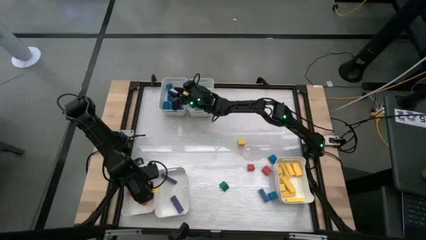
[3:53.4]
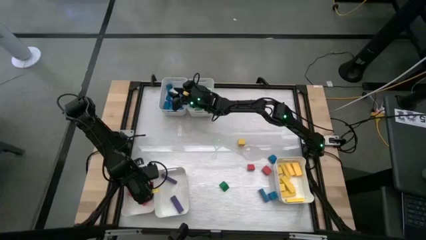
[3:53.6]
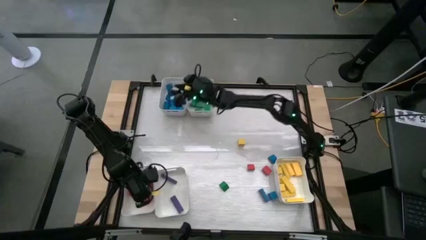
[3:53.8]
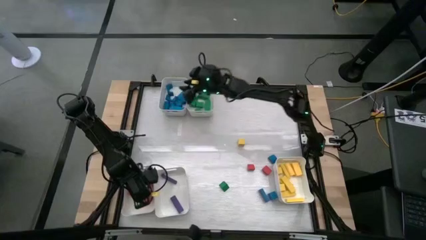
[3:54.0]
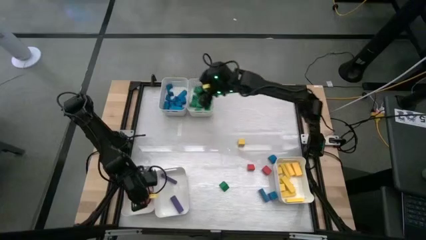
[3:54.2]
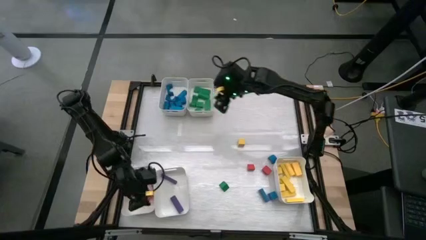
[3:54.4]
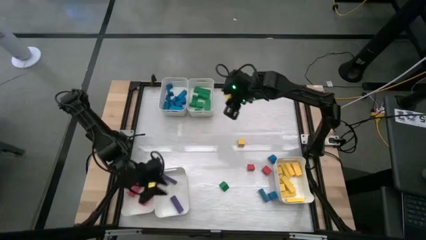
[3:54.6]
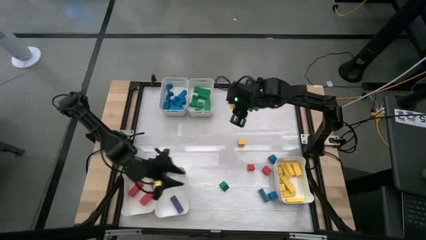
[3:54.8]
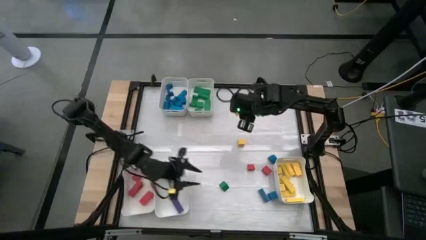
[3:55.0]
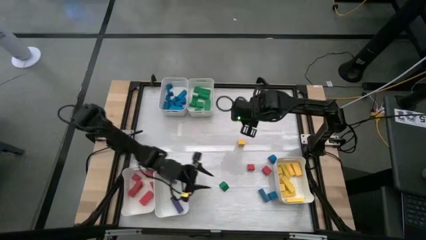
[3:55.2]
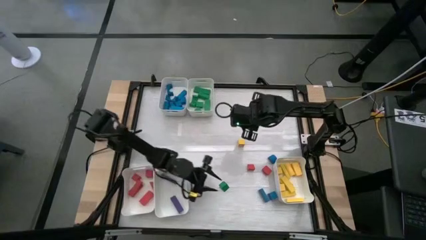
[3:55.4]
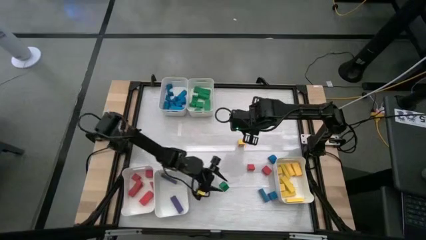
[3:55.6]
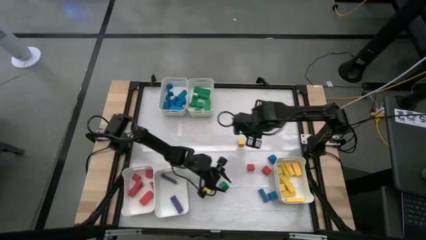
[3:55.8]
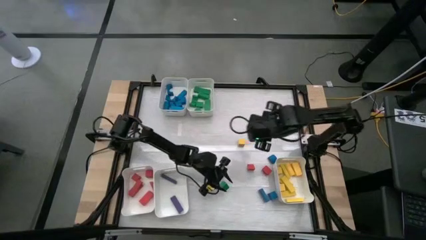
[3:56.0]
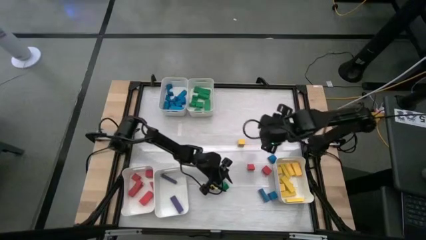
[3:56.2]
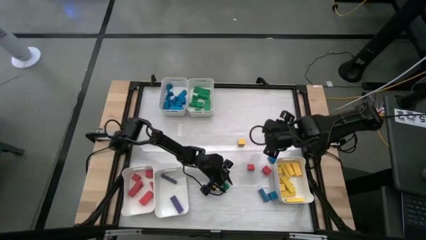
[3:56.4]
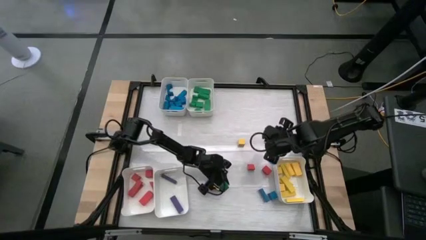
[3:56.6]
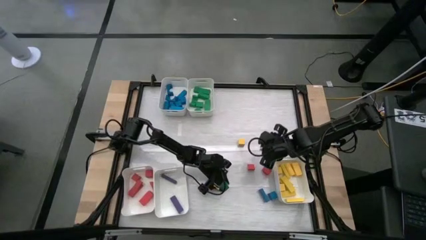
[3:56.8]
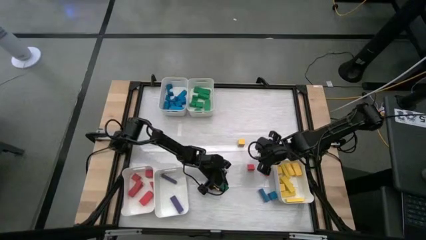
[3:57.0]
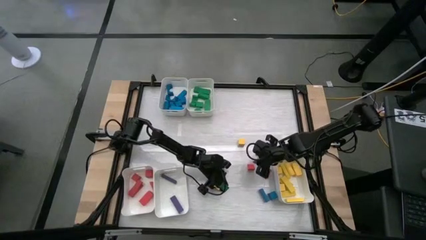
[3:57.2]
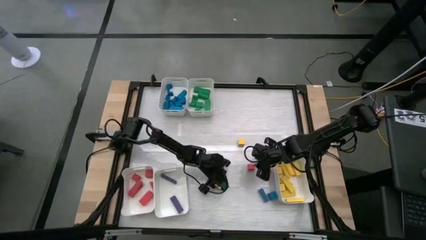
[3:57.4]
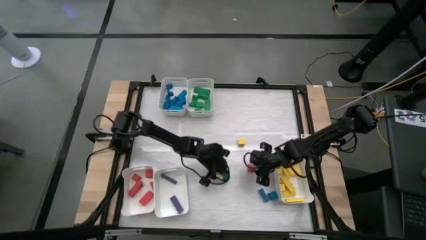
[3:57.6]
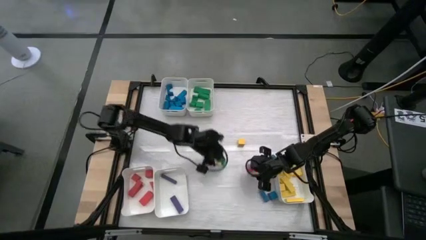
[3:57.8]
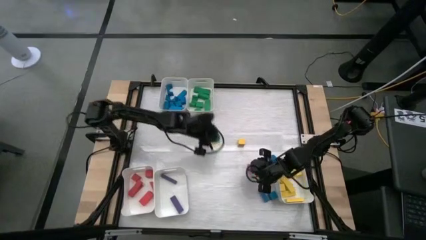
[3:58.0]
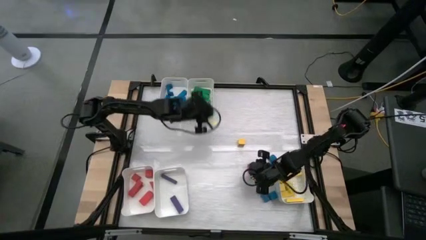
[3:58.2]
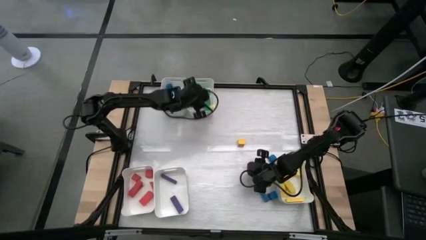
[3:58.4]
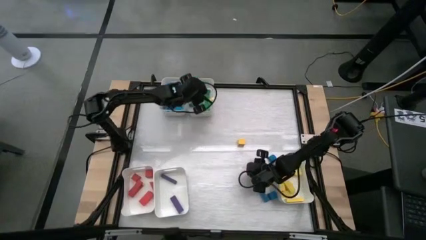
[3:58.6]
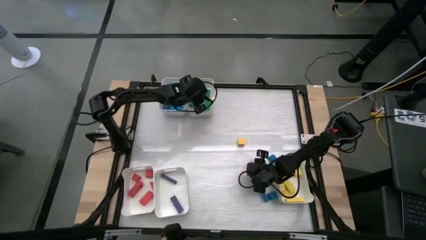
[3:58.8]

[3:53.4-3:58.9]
Task: Sort blocks
Put the green block into the top right white bin

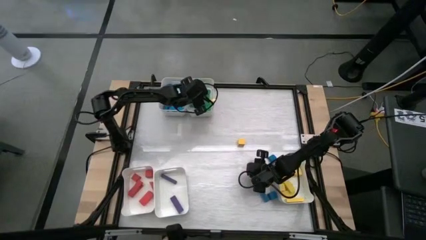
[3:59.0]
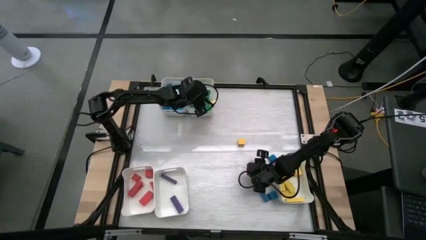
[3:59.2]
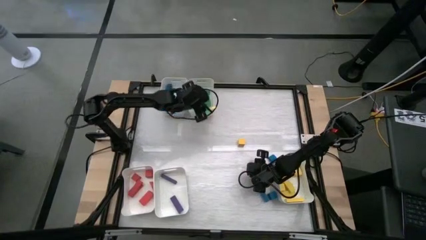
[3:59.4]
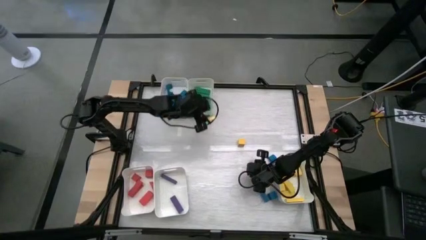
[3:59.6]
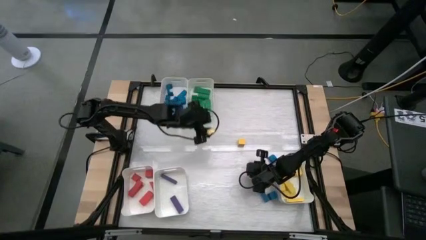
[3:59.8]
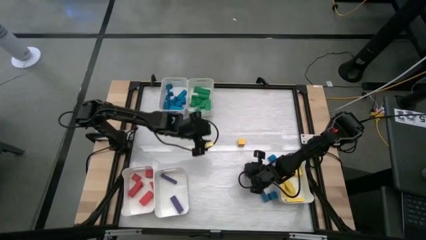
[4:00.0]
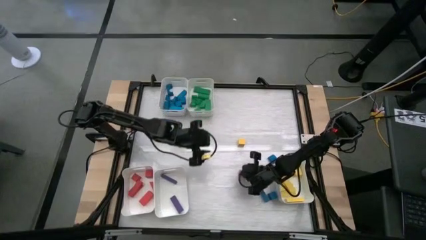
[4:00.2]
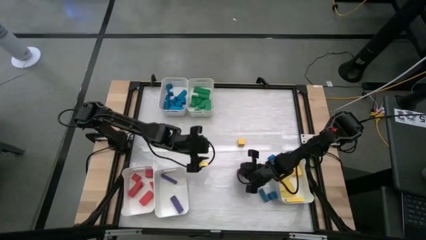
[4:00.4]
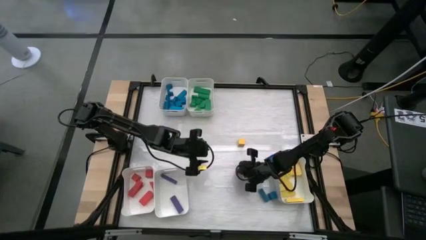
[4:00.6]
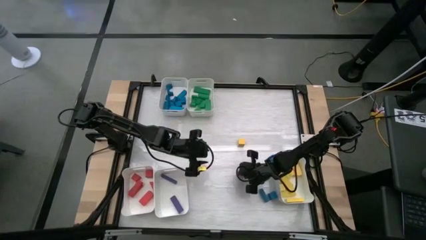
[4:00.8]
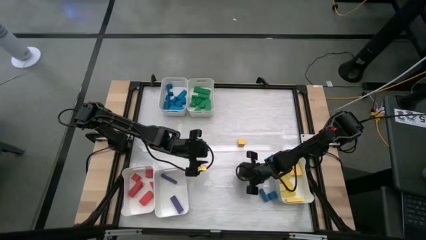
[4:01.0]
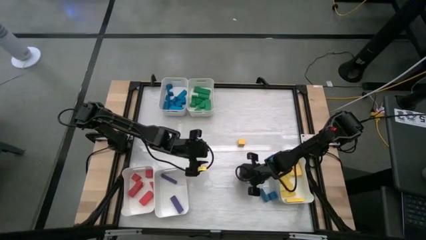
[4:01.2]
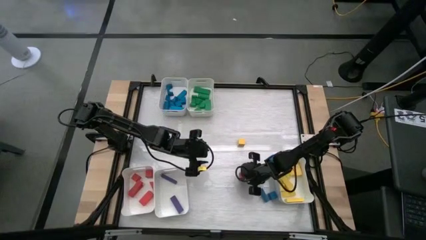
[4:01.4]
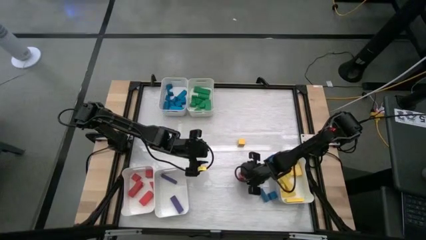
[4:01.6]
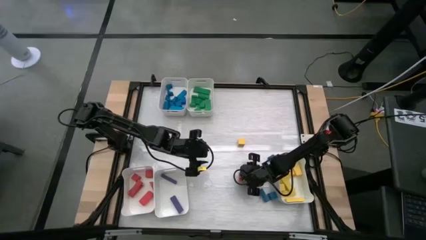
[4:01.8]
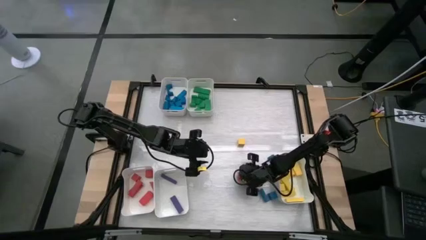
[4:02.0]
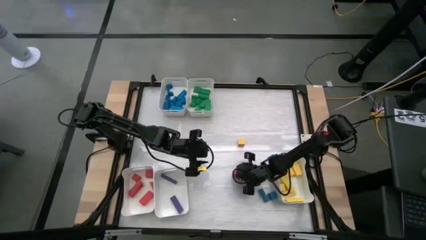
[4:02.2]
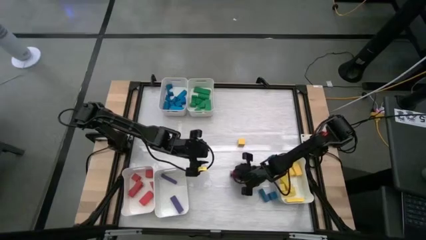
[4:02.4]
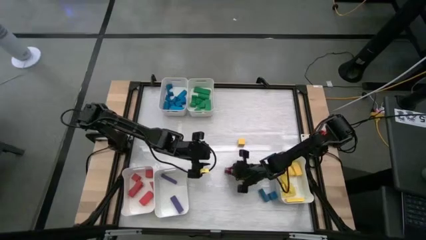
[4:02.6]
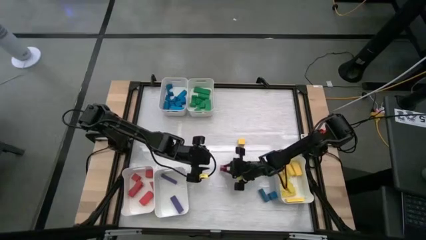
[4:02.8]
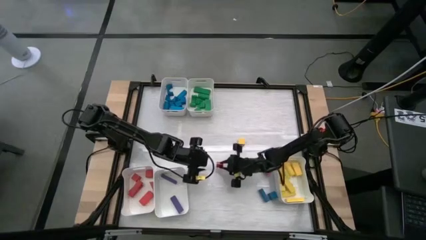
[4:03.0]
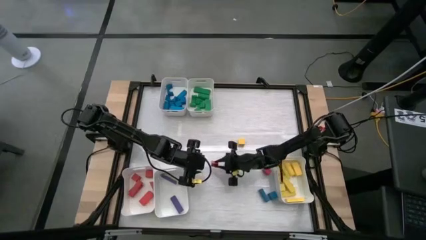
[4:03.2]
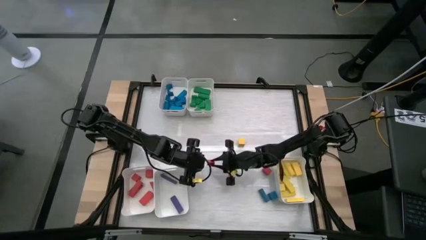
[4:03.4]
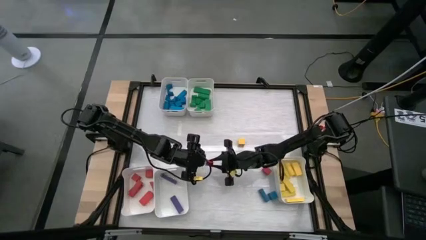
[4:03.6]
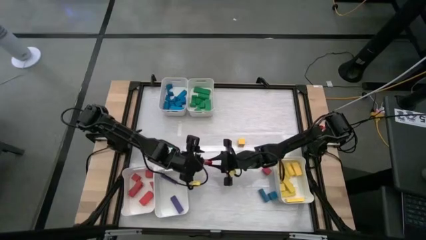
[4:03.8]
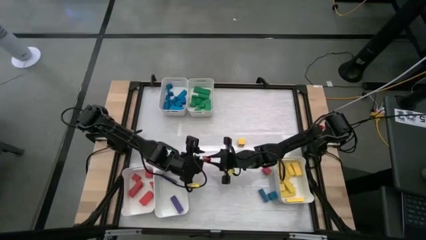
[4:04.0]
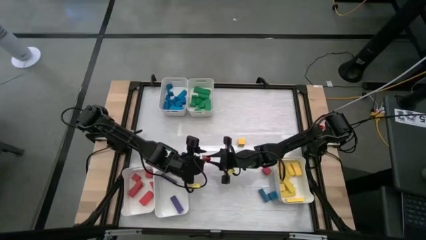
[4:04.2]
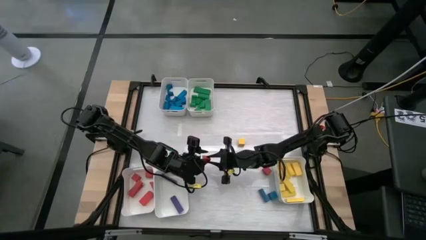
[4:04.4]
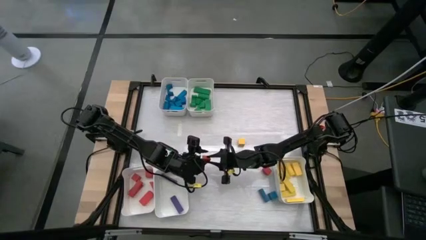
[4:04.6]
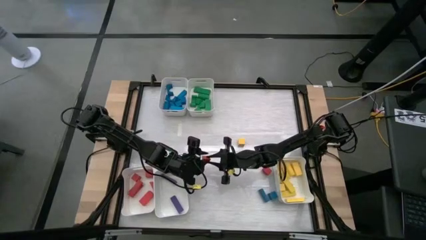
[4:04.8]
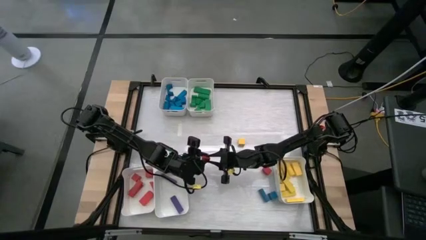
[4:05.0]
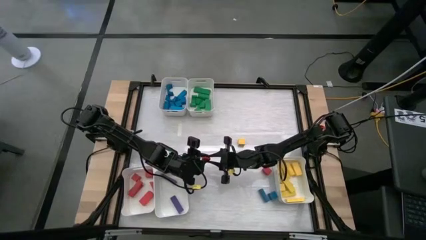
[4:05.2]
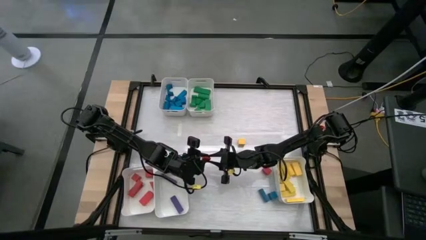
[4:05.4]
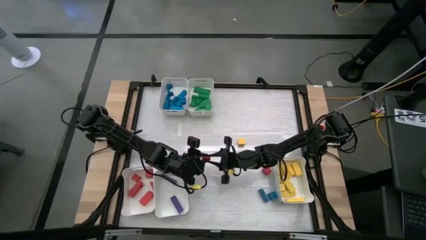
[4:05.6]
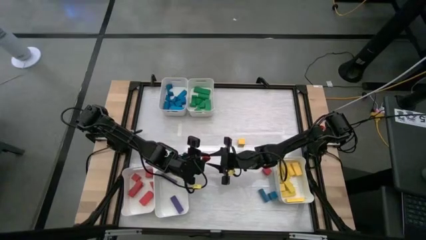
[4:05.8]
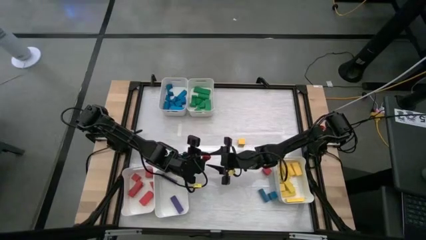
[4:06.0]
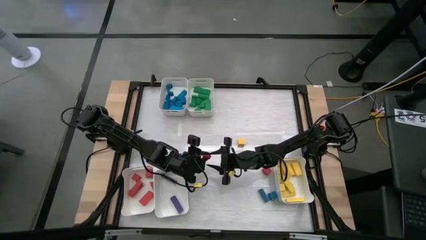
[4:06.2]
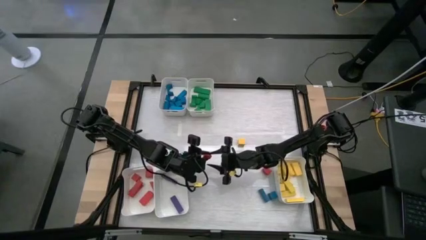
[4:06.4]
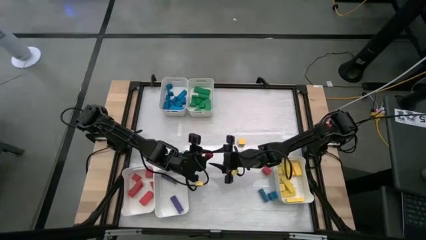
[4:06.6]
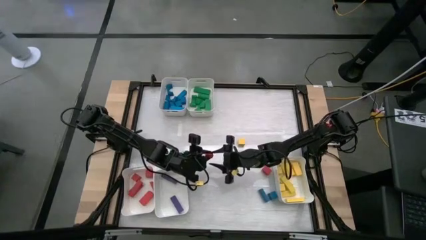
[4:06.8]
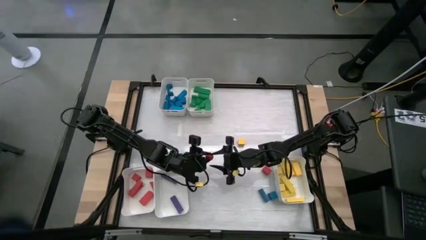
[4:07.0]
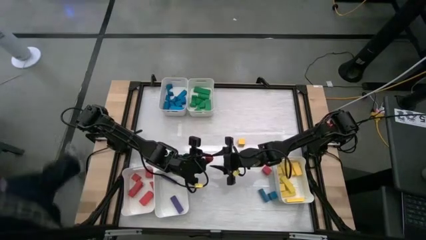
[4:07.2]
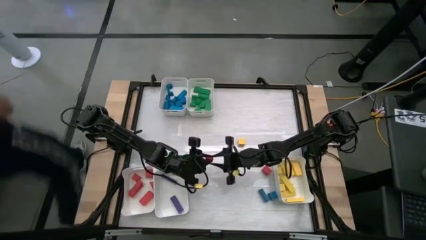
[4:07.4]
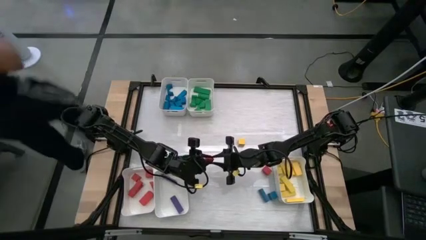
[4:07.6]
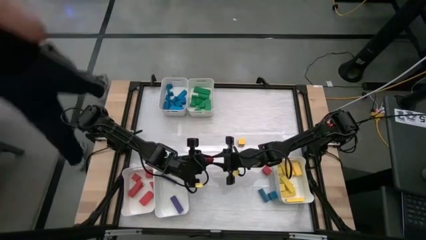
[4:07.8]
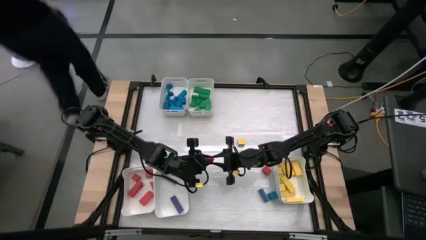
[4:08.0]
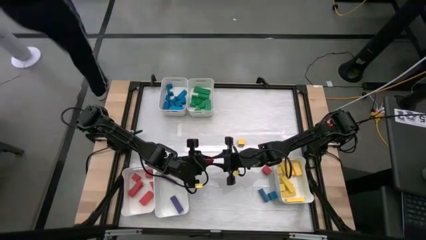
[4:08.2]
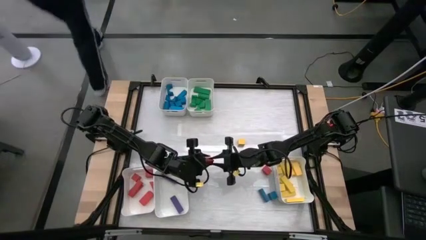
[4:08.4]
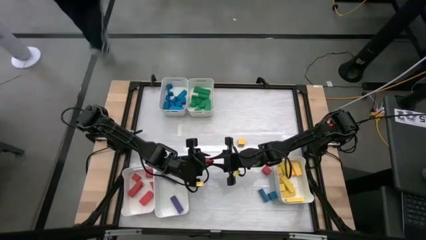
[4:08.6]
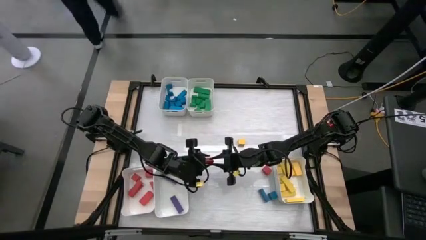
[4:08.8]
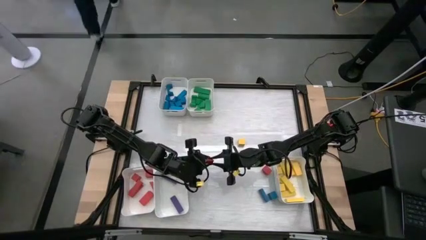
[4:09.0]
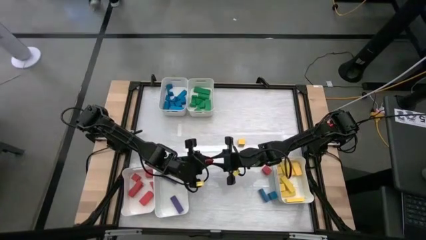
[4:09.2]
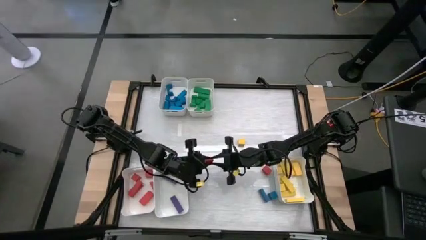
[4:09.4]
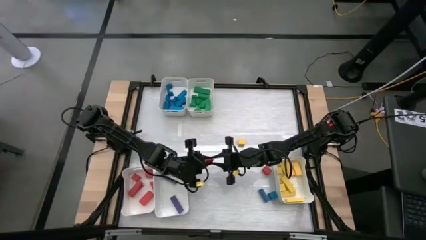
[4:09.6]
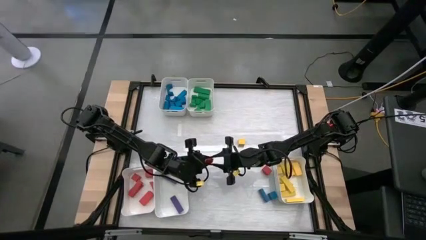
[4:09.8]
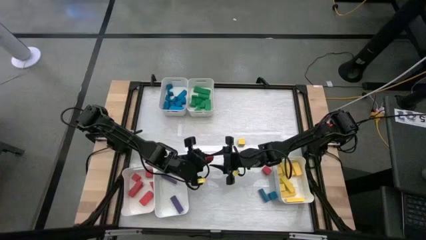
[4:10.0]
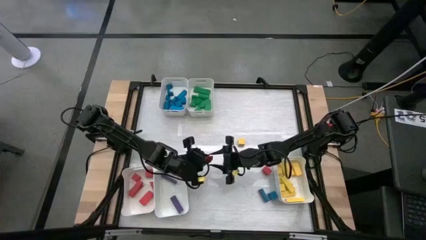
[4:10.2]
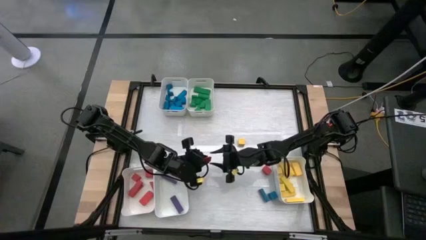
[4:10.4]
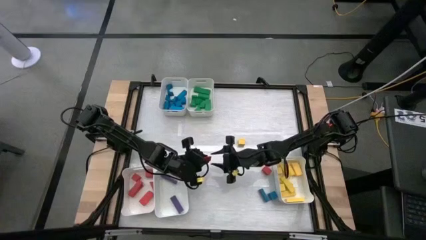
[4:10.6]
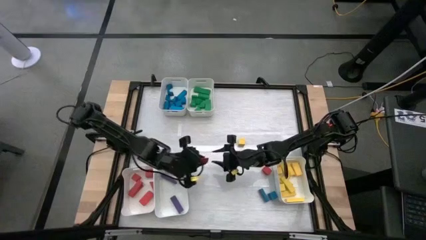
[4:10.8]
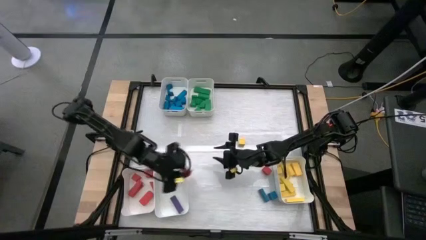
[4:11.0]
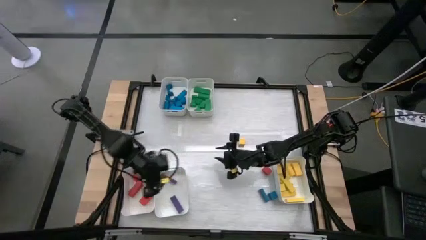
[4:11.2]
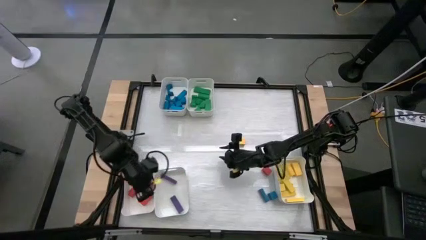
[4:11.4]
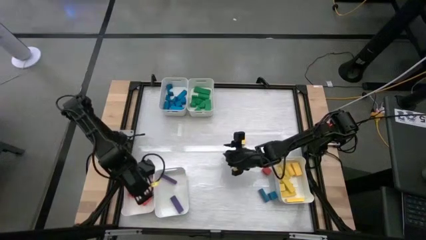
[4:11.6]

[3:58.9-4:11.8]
Put the red block into the bottom left white bin
